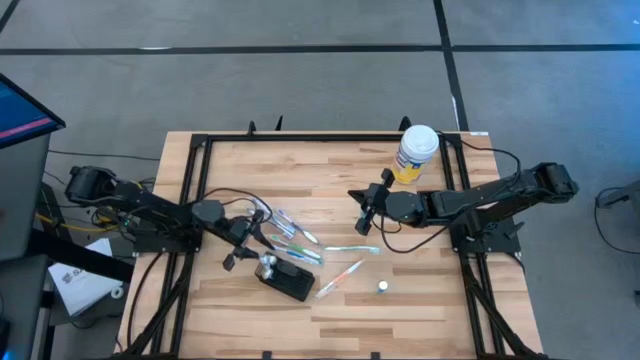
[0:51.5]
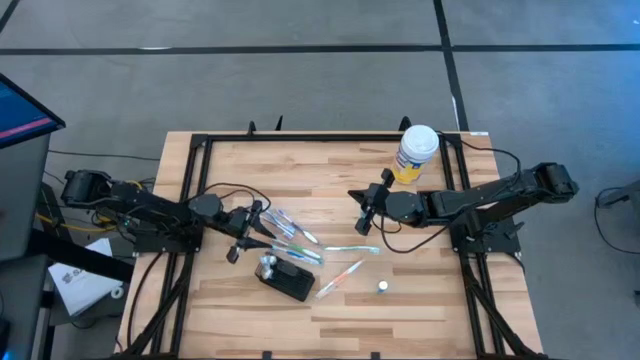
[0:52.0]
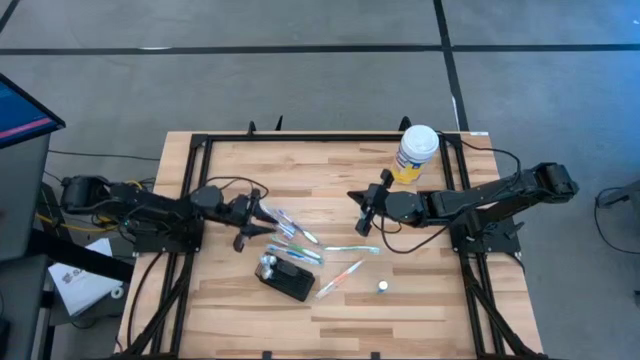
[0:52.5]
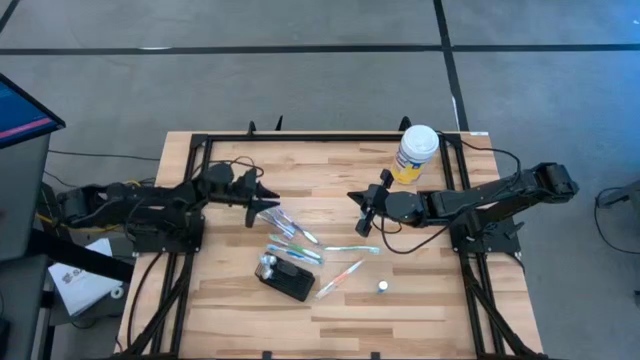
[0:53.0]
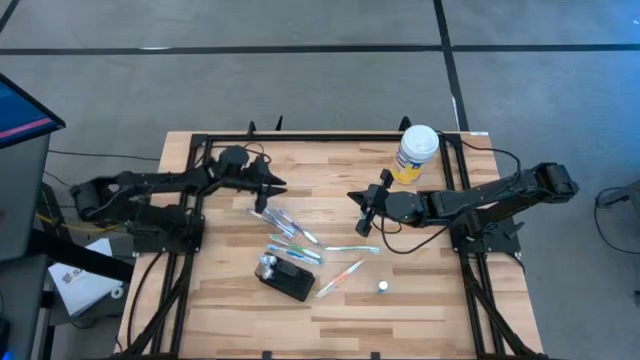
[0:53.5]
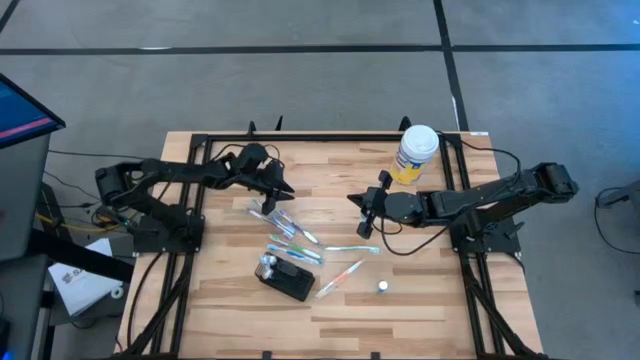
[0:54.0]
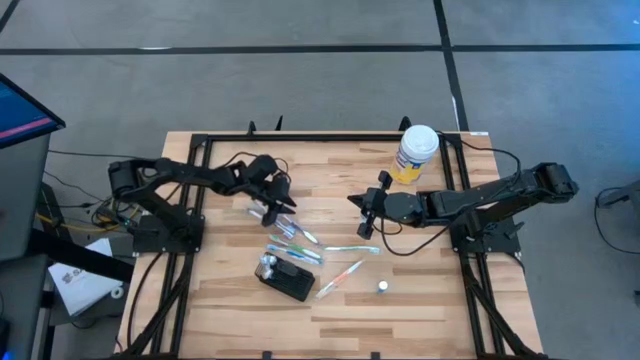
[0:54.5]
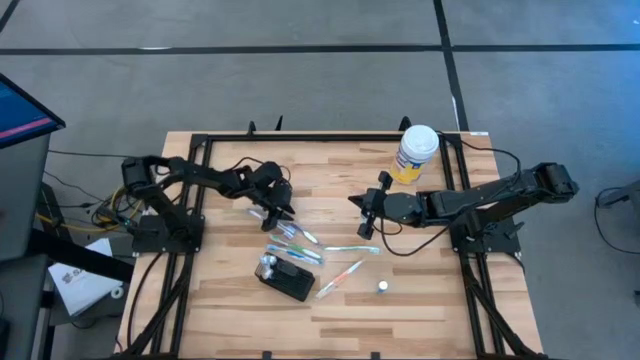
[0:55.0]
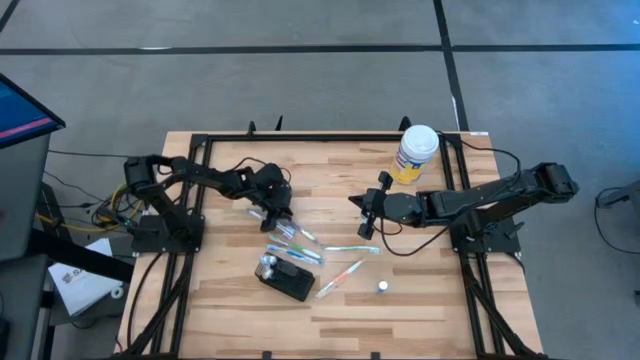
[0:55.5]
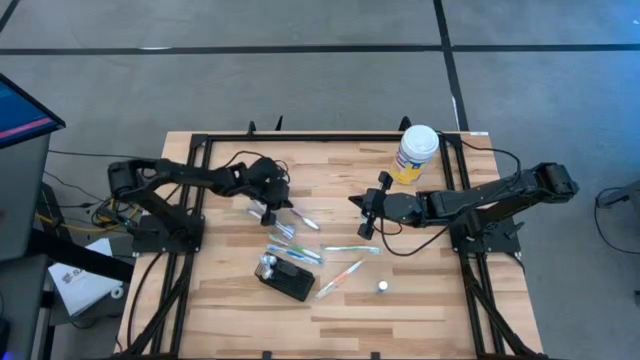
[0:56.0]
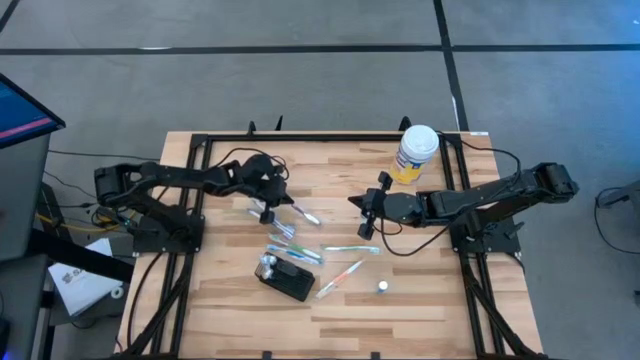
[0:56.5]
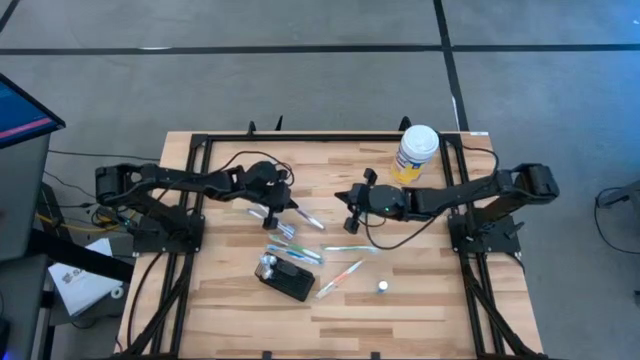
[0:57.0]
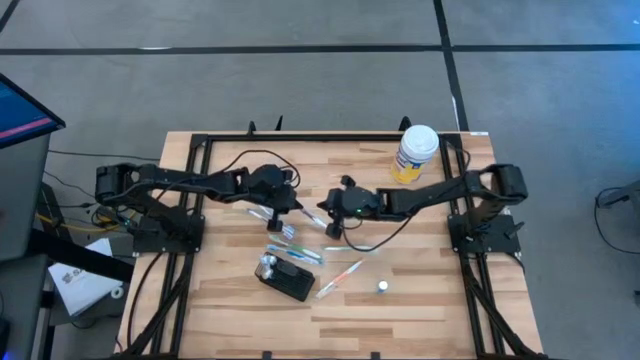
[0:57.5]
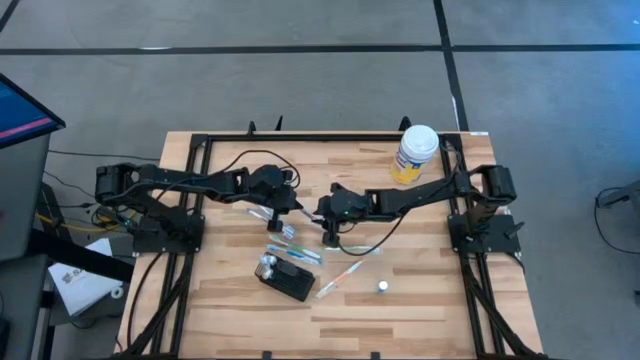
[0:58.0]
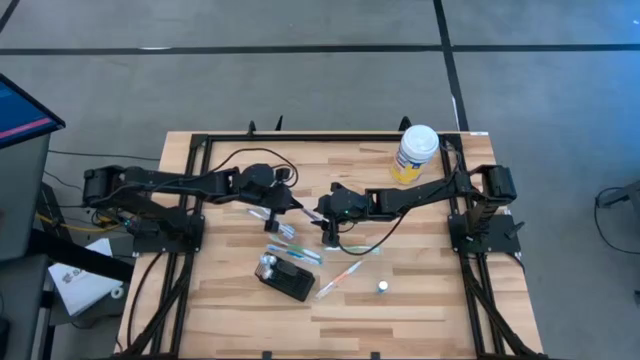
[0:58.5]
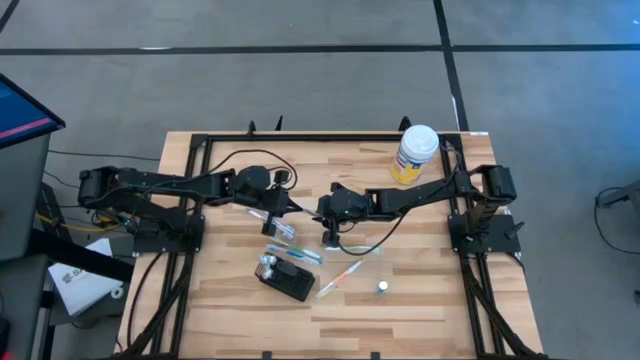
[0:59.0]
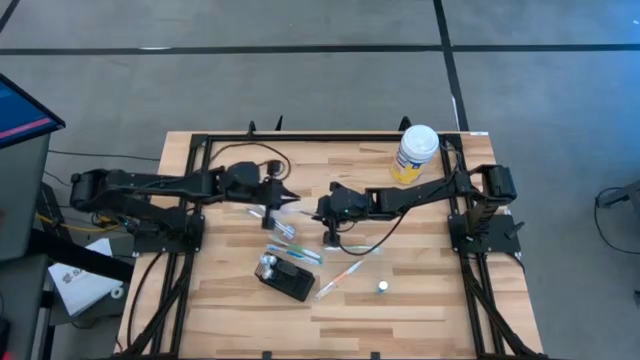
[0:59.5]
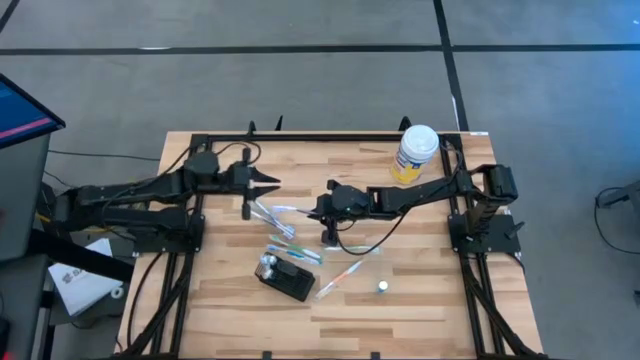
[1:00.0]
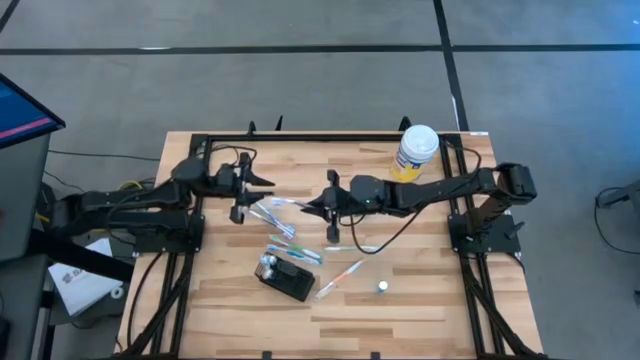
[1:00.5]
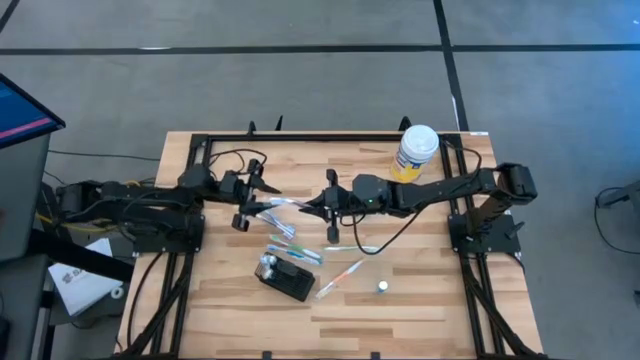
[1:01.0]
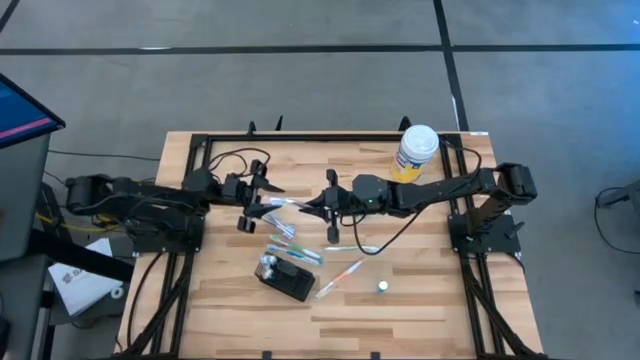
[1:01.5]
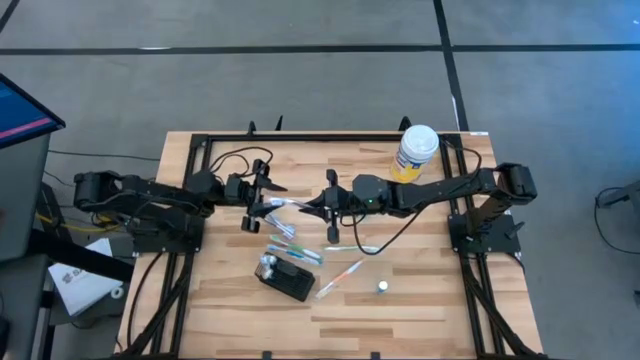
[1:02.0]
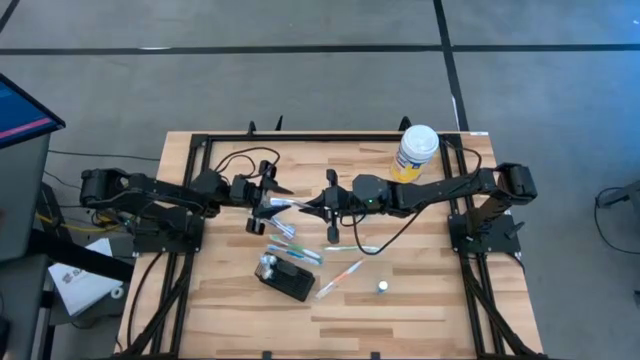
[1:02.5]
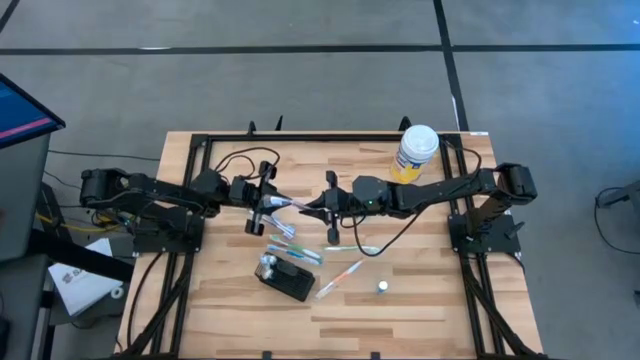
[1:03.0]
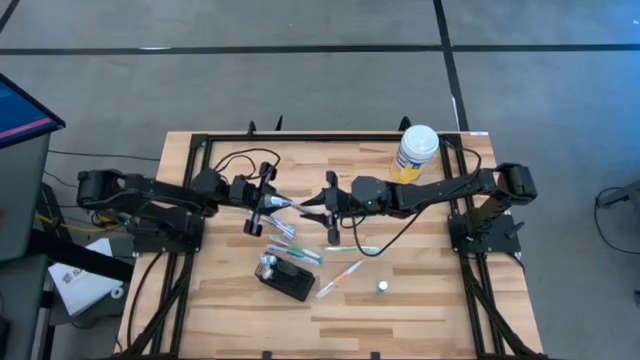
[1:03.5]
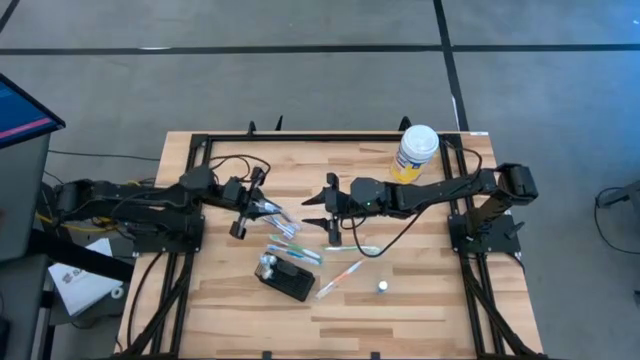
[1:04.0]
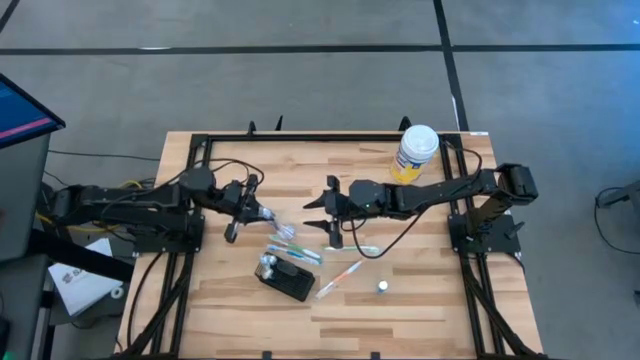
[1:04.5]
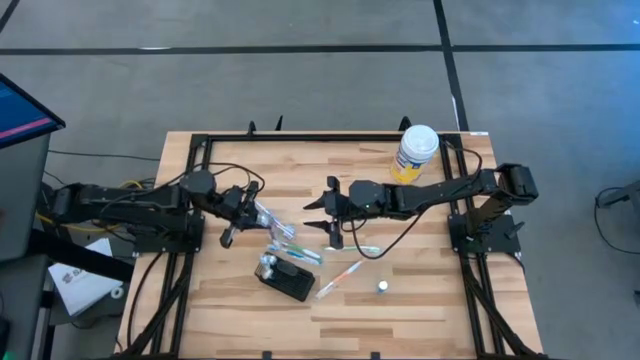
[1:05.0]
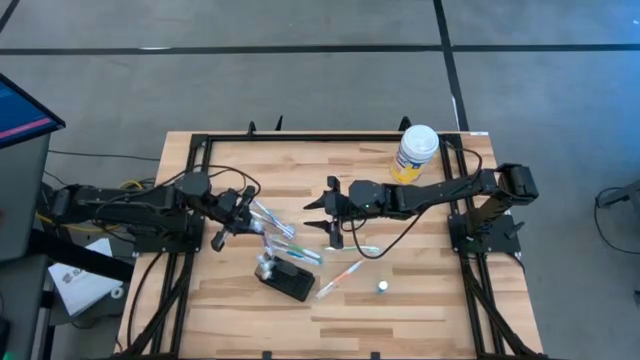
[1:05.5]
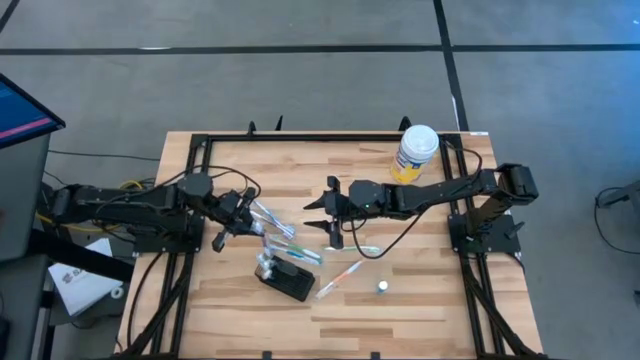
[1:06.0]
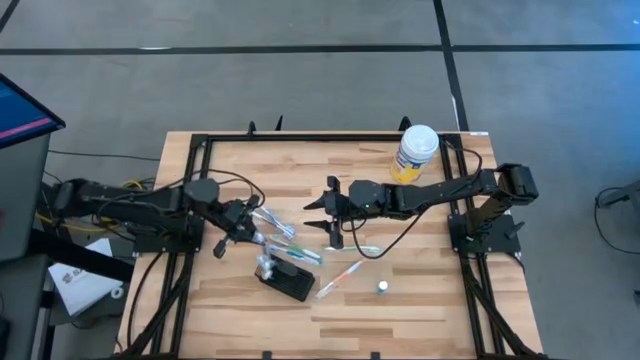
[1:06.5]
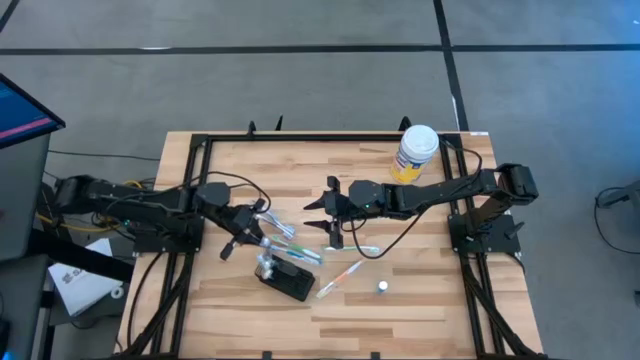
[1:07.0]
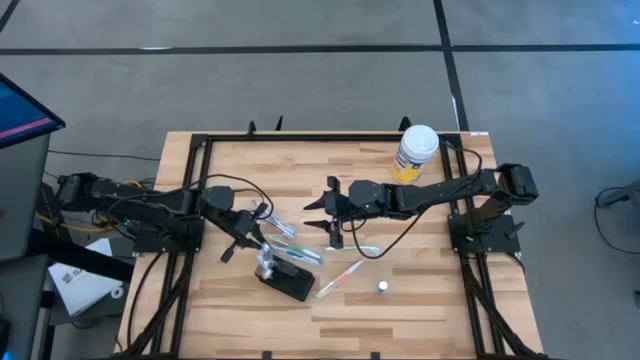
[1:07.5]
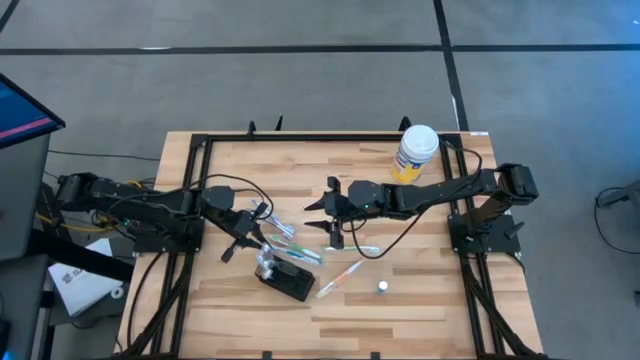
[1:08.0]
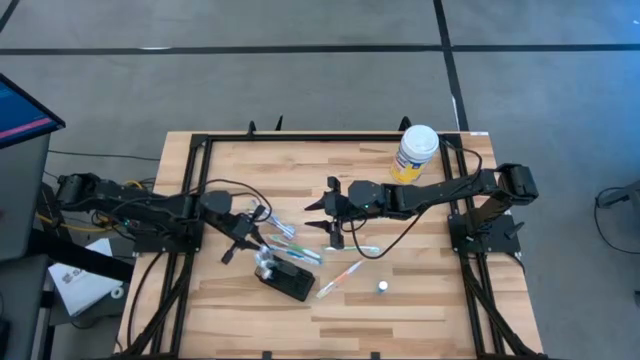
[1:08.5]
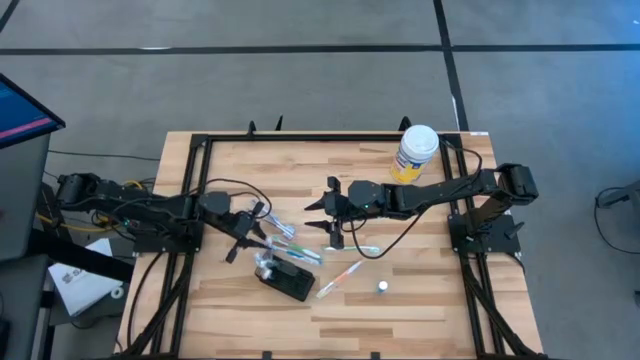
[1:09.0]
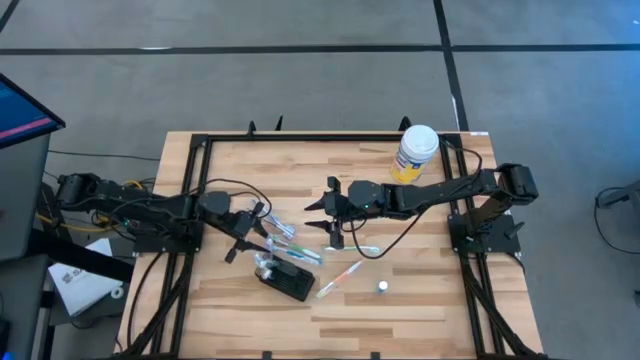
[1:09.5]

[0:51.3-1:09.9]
Task: Pick & Place toothbrushing station
Put the purple toothbrush into the mesh organizer
